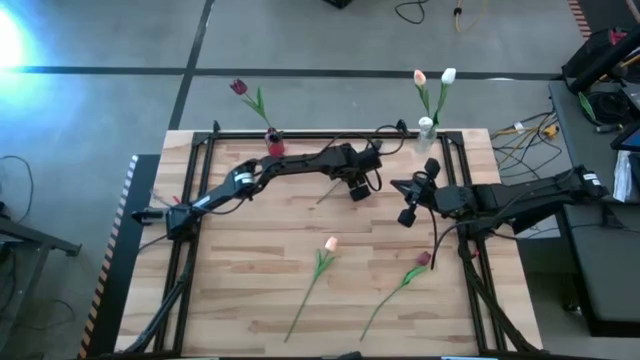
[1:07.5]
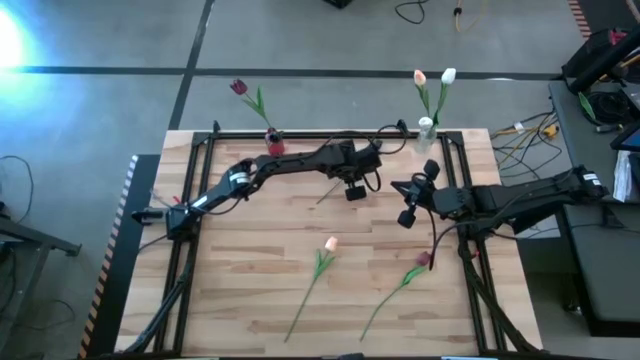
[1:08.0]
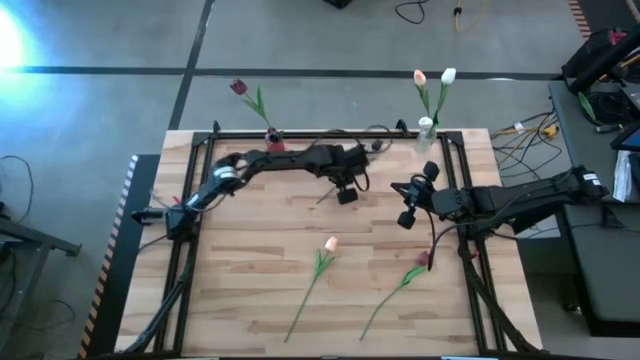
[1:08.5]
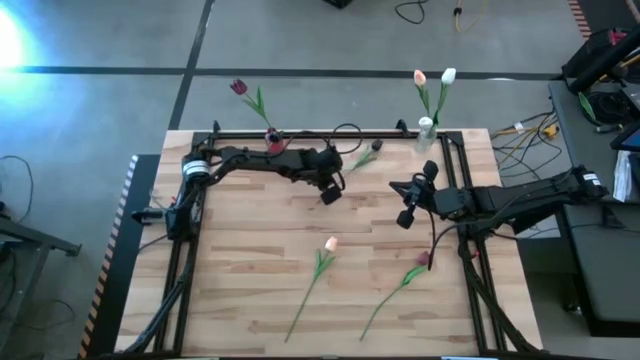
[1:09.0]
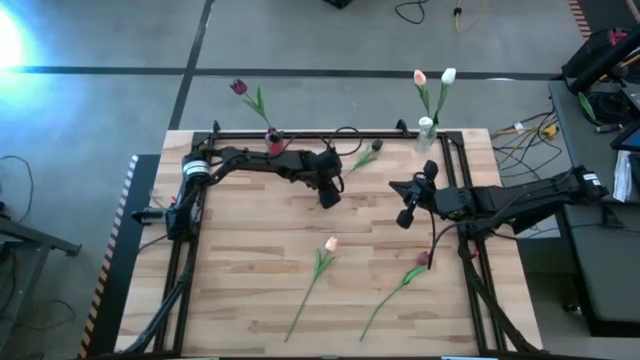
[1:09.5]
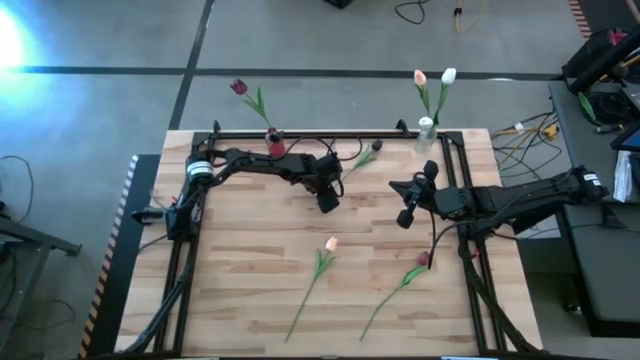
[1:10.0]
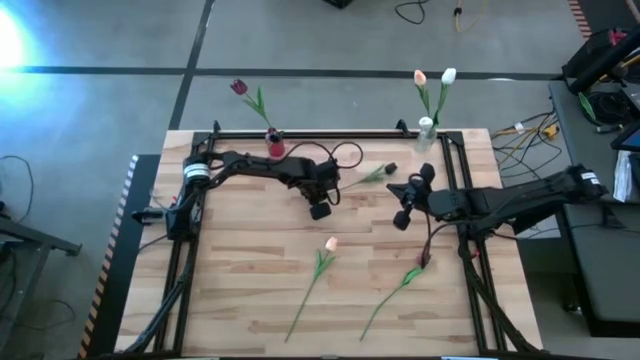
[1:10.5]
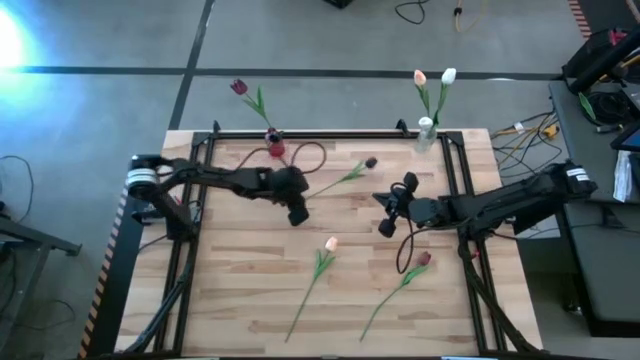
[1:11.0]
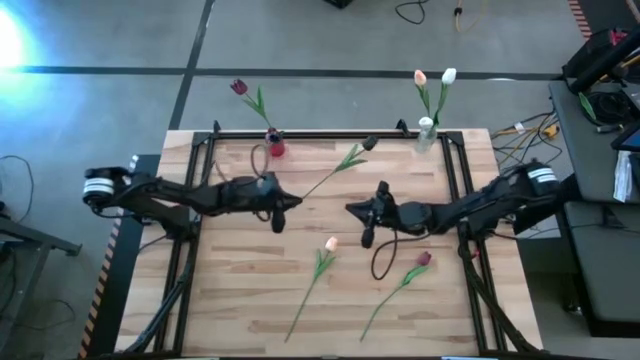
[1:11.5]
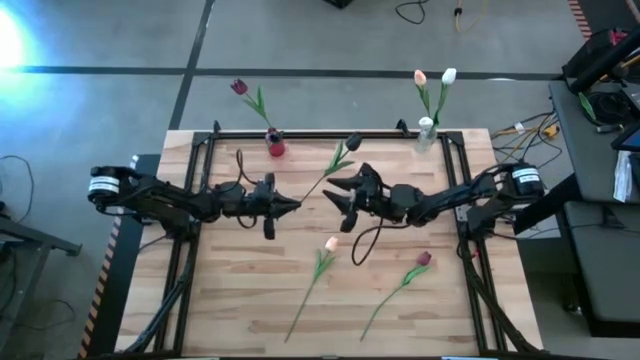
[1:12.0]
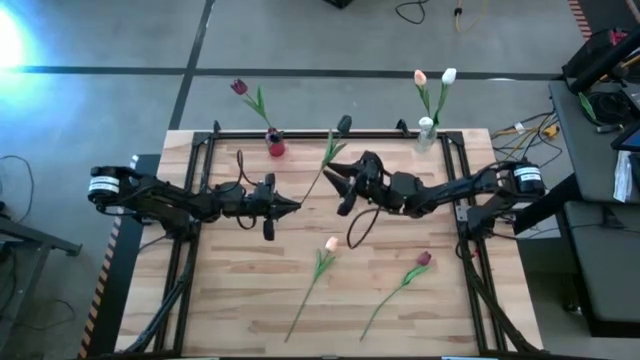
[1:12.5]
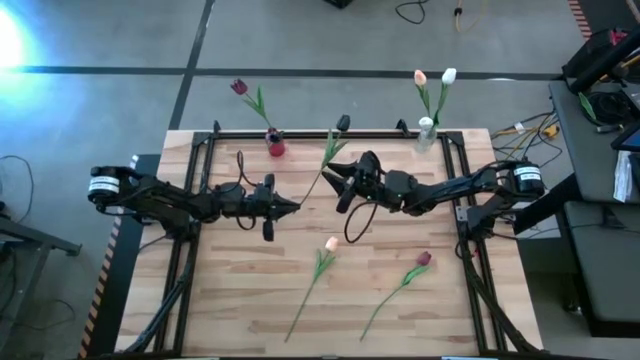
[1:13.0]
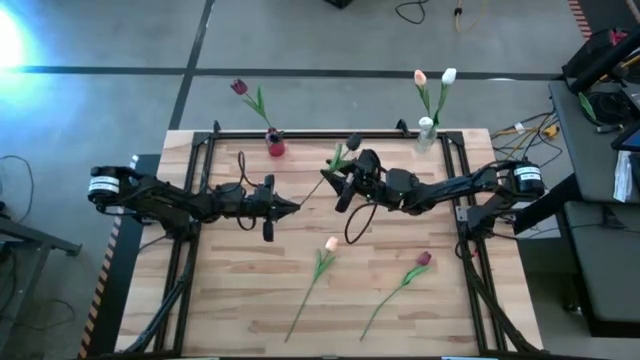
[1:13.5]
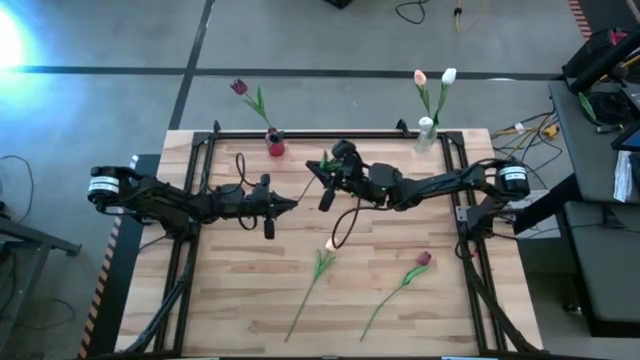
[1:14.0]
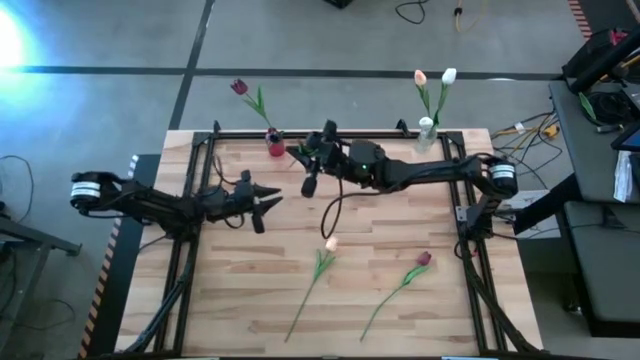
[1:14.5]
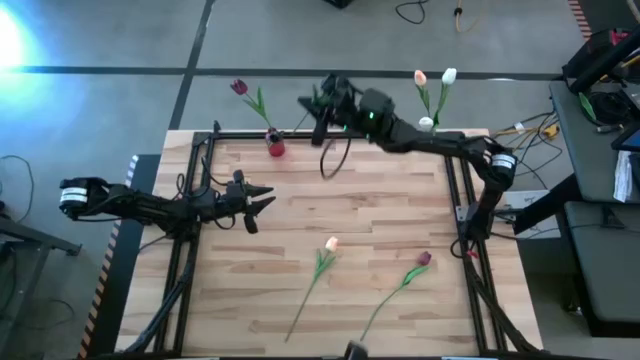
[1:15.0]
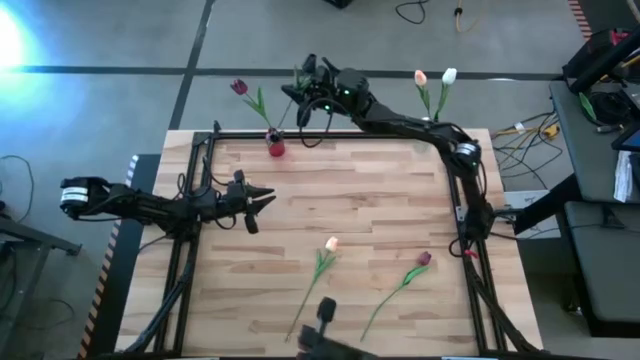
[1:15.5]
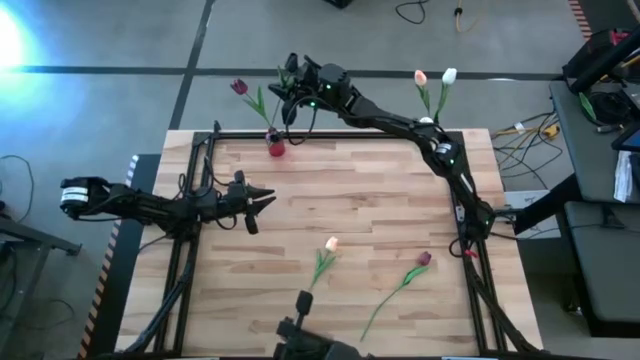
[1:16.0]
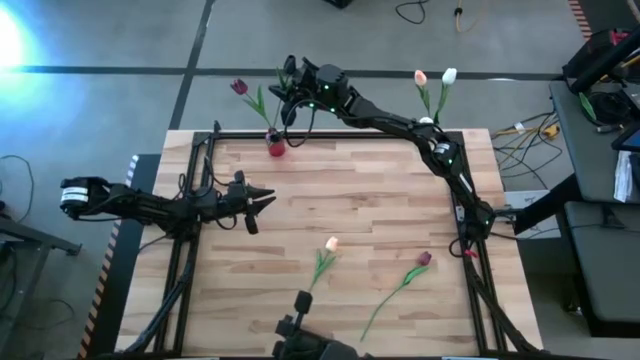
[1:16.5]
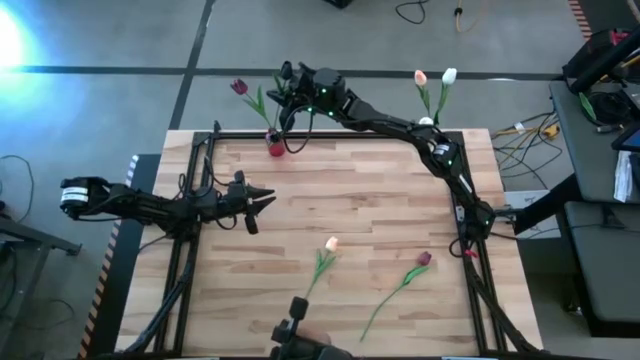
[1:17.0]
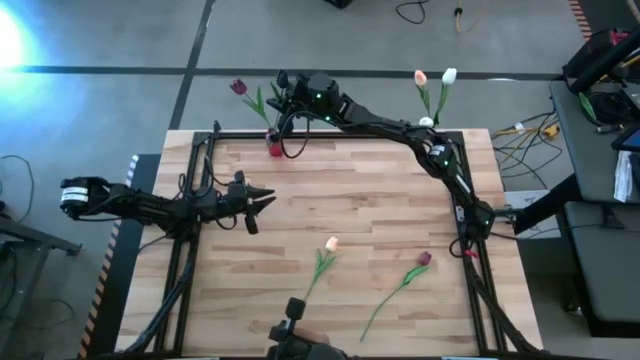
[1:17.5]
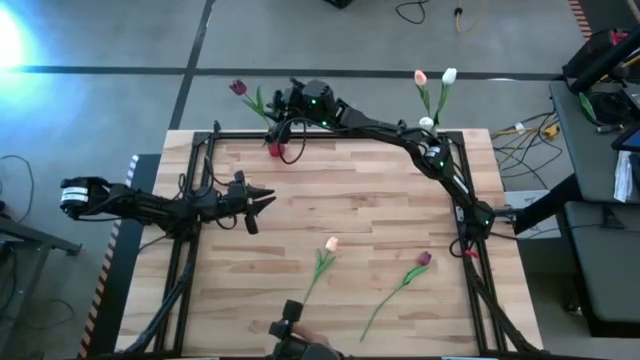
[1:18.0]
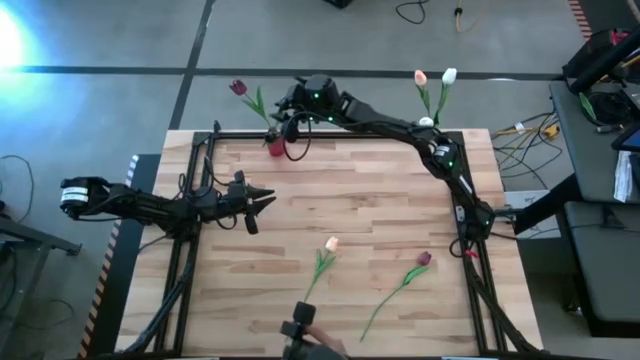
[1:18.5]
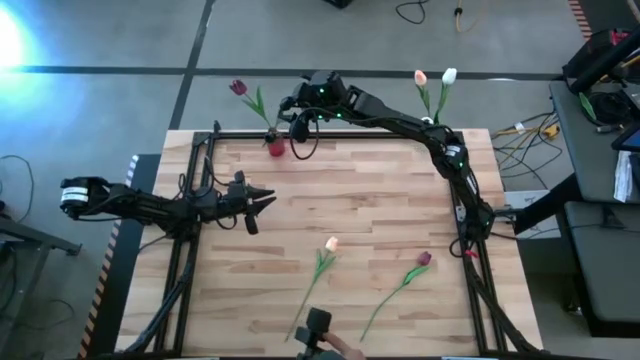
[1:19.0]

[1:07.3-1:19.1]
Task: Sort flowers into vase by color
Put the black tulip into the red vase

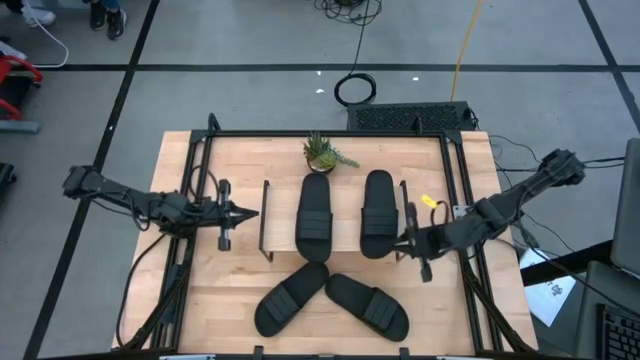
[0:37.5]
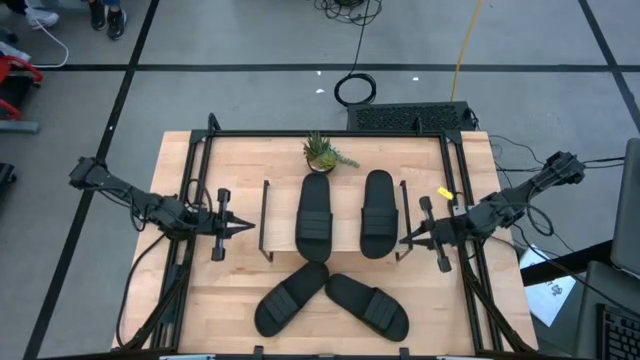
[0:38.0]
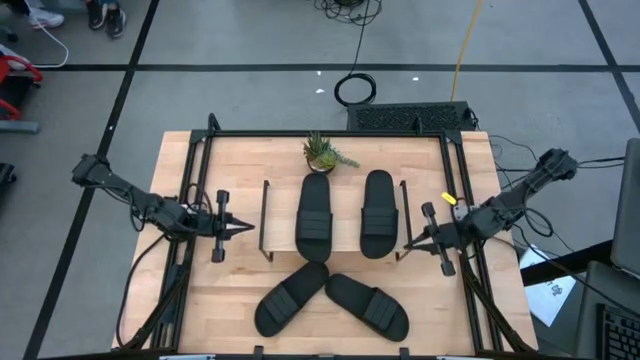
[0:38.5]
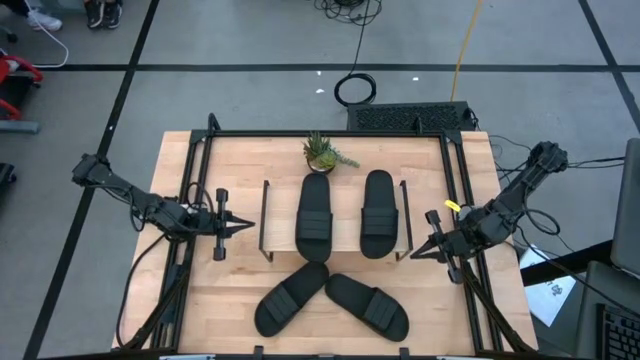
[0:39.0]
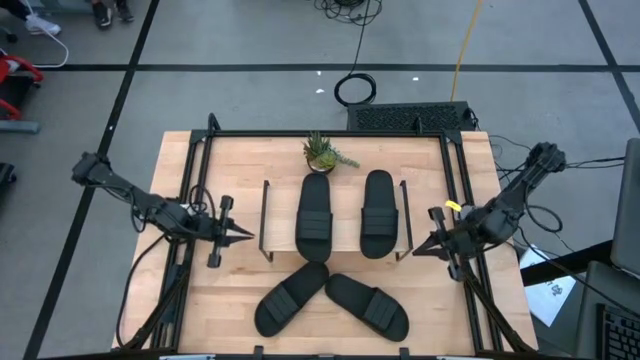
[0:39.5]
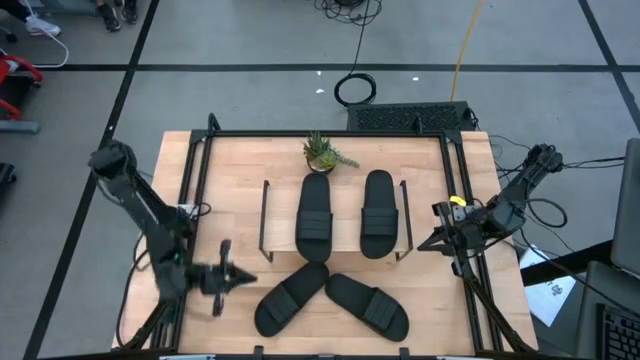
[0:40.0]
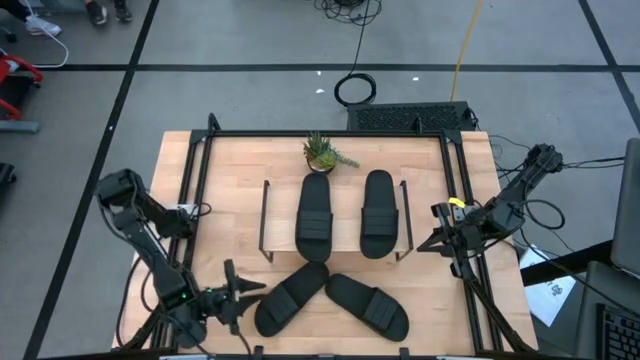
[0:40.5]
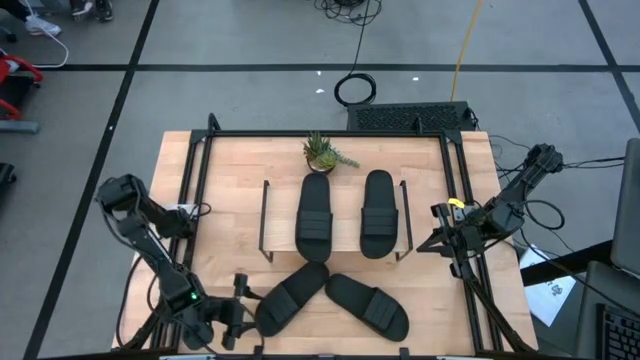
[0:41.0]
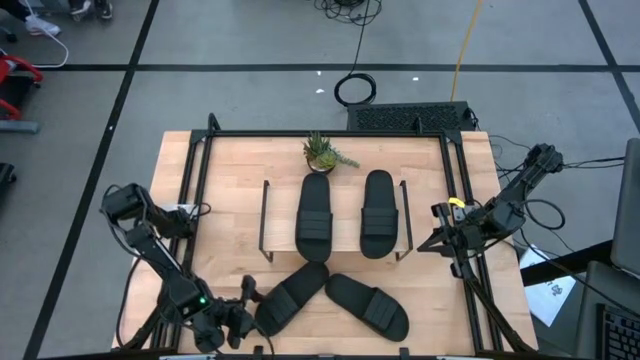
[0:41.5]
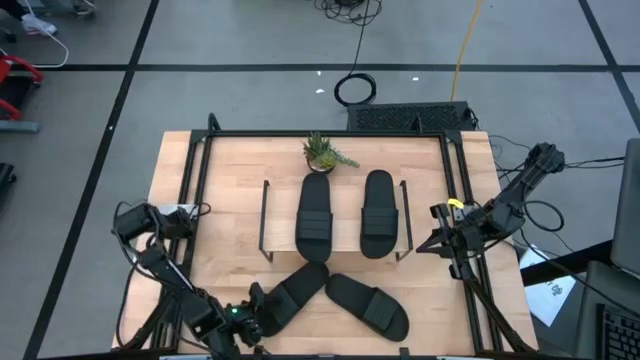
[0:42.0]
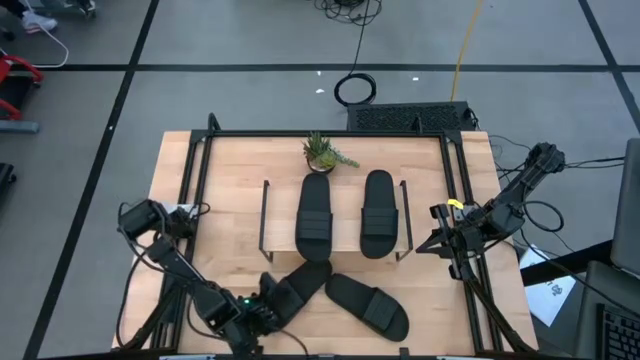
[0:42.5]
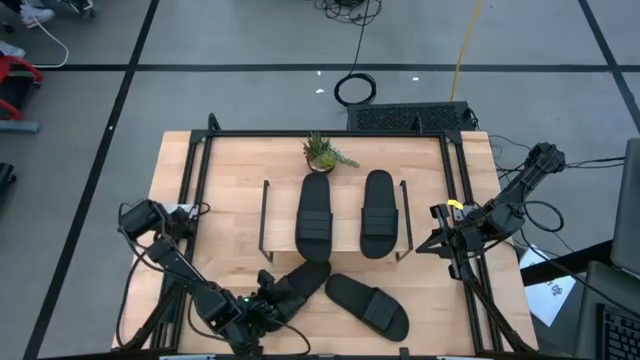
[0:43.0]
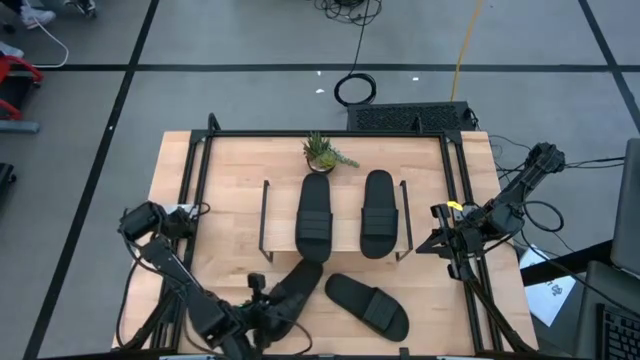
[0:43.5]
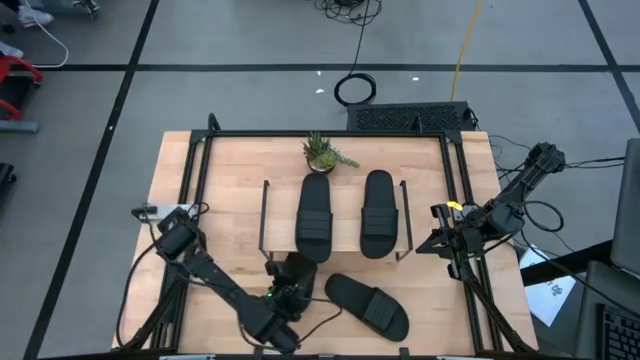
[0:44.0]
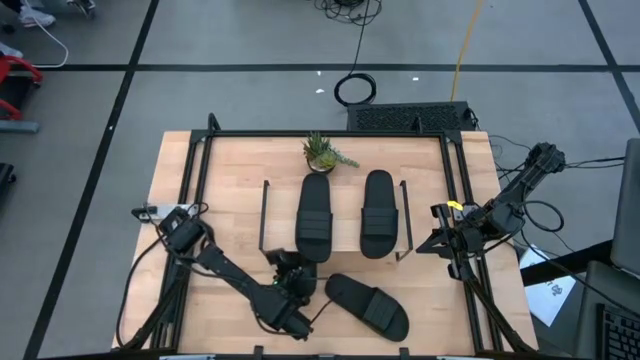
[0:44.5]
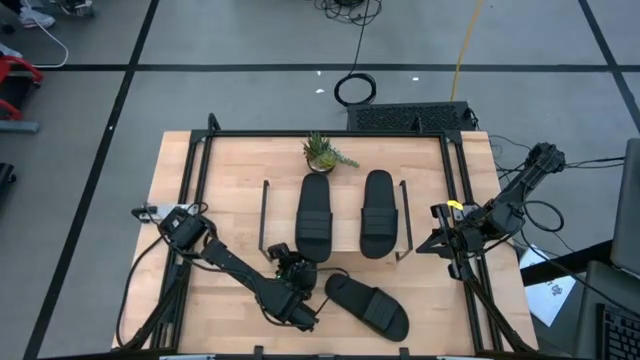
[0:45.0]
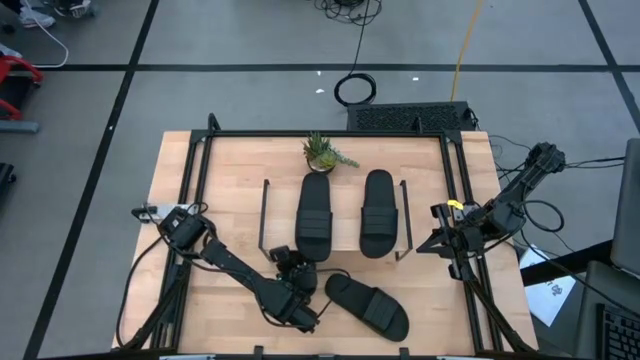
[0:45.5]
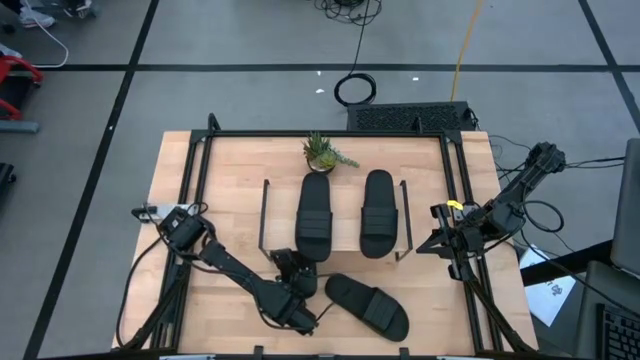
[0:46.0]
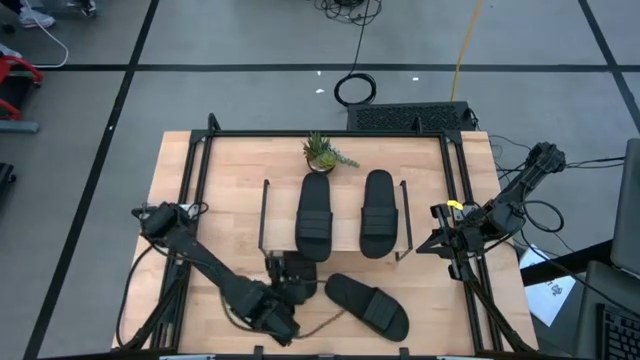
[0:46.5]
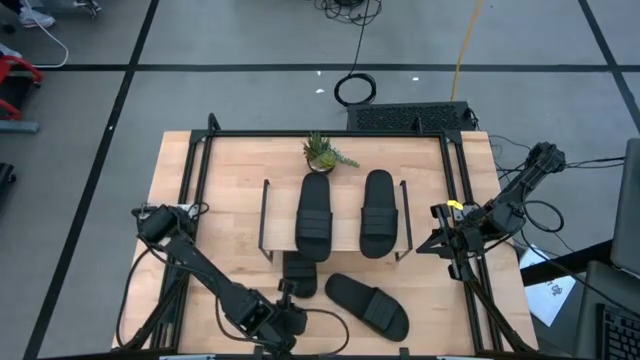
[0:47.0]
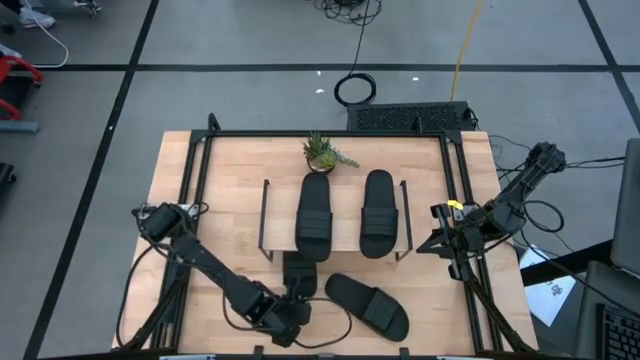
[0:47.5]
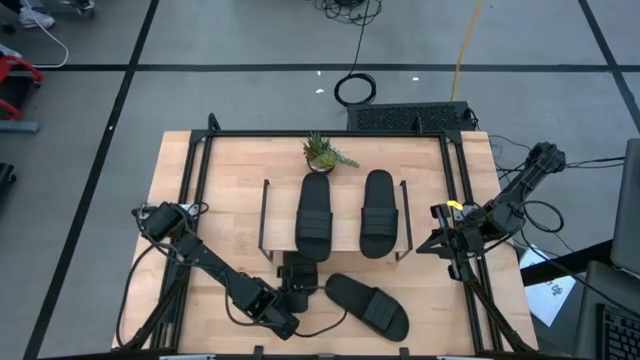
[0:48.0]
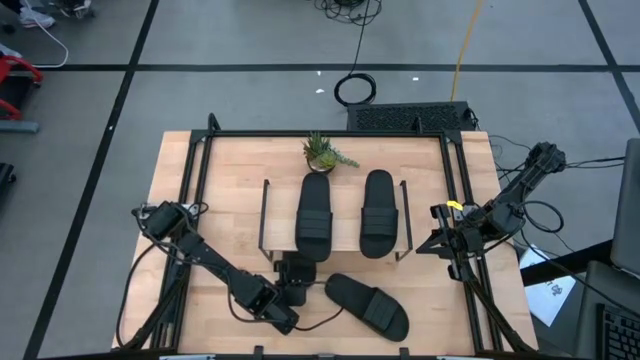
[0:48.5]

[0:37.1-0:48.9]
Task: Pick and place slides into the shelf
Put the black sandal under the shelf
